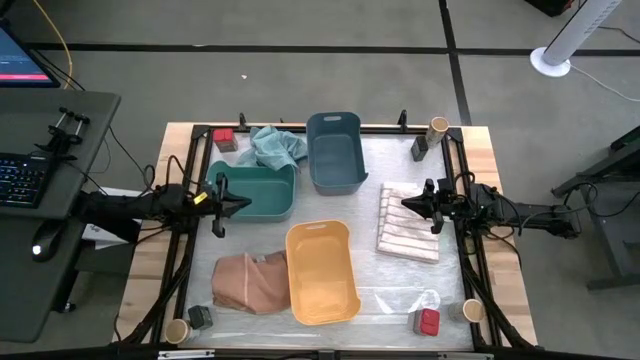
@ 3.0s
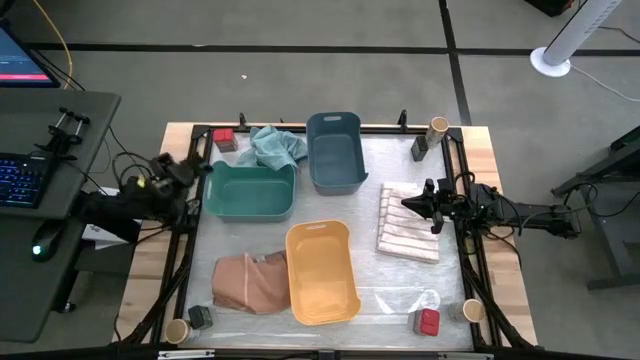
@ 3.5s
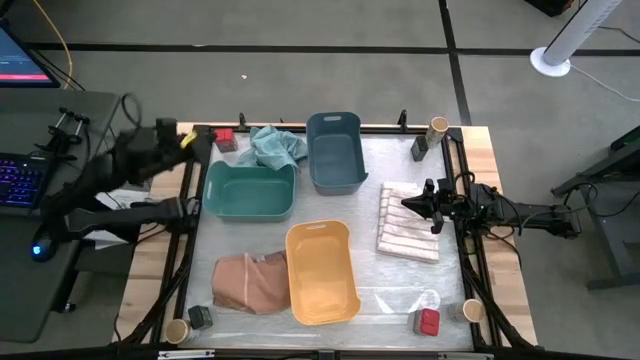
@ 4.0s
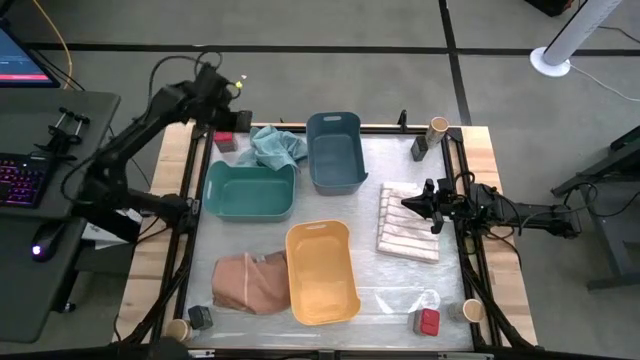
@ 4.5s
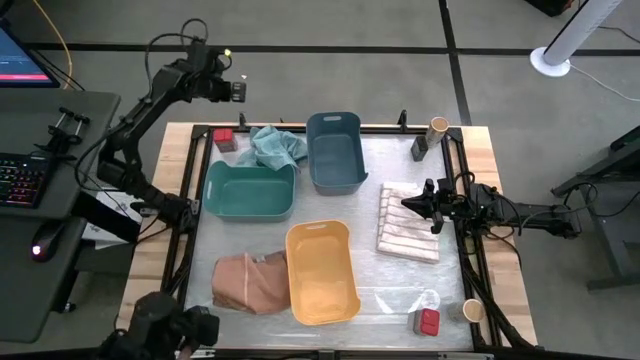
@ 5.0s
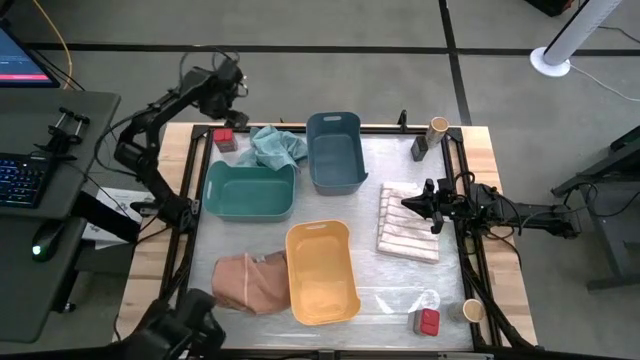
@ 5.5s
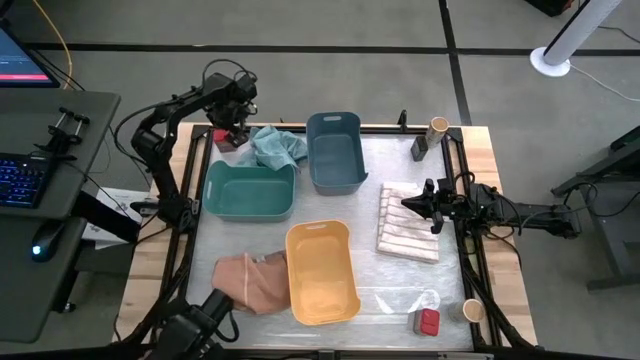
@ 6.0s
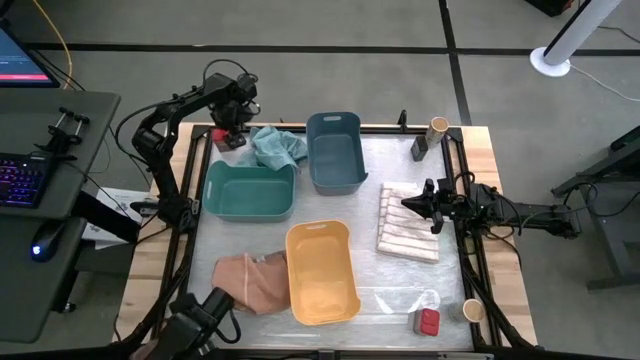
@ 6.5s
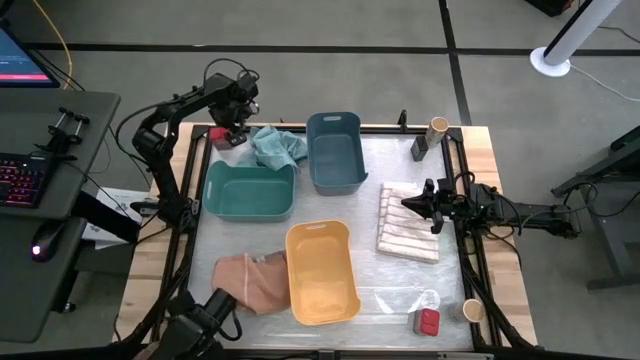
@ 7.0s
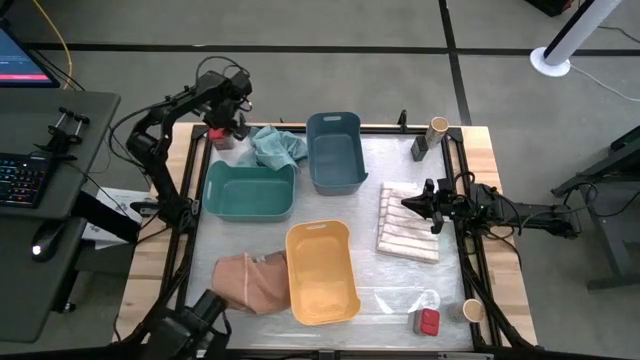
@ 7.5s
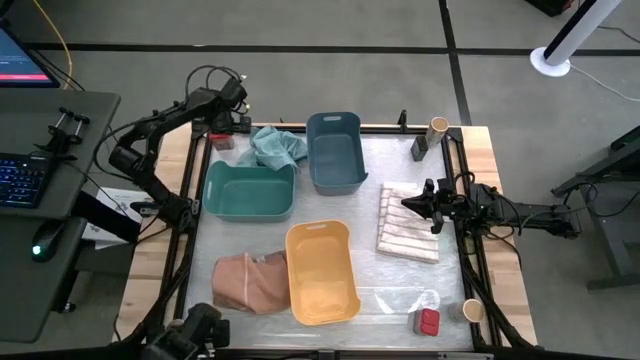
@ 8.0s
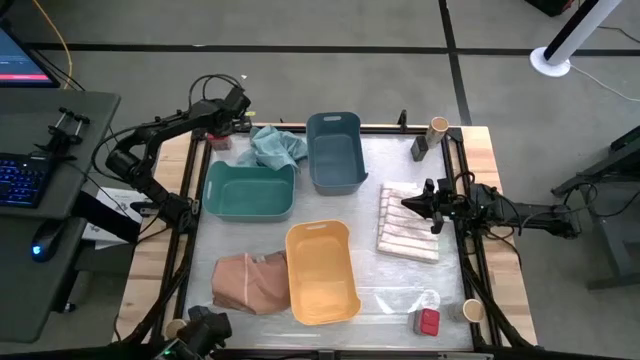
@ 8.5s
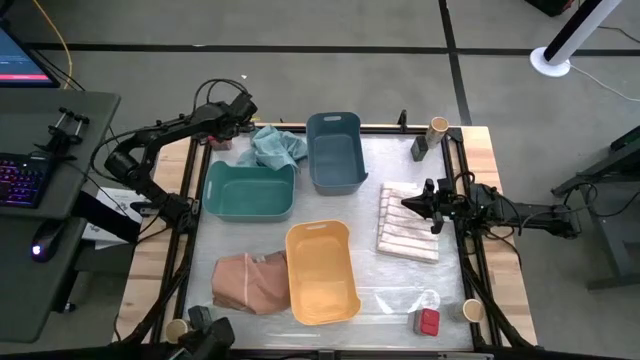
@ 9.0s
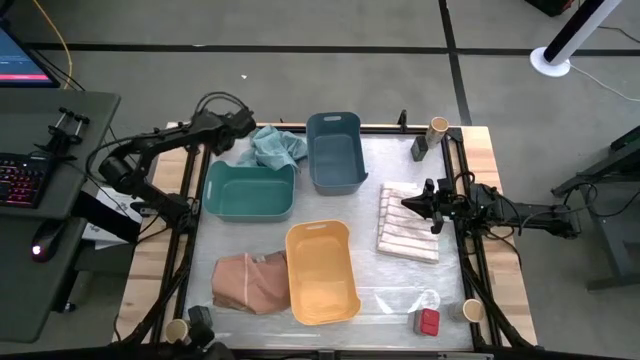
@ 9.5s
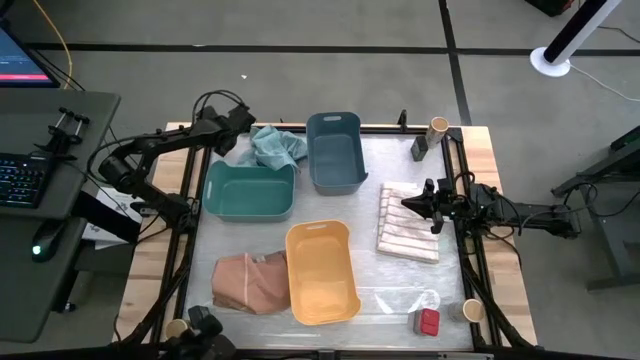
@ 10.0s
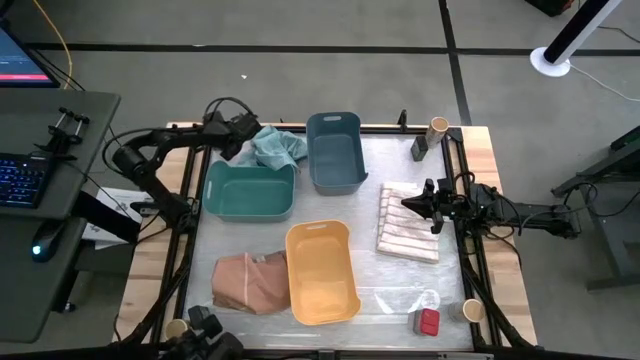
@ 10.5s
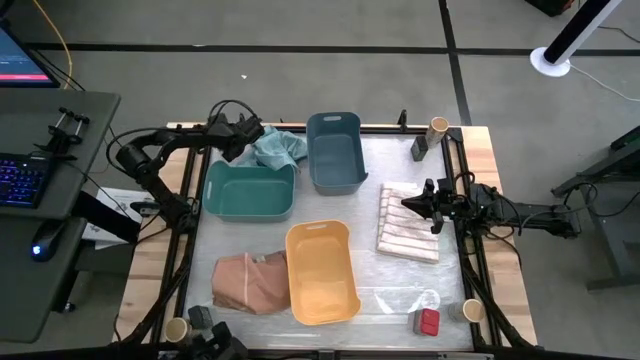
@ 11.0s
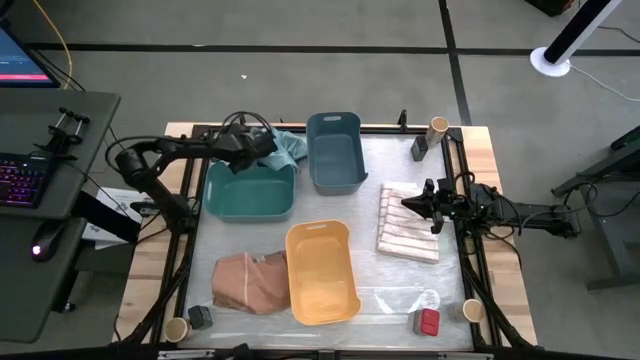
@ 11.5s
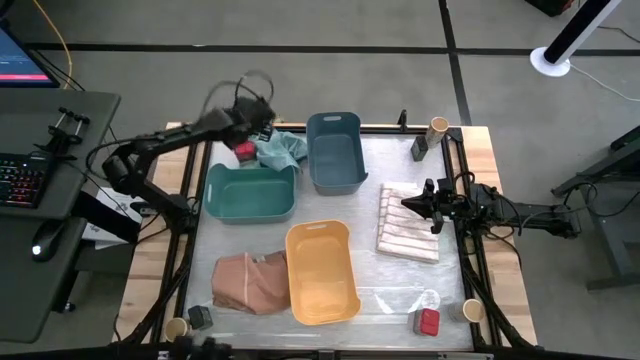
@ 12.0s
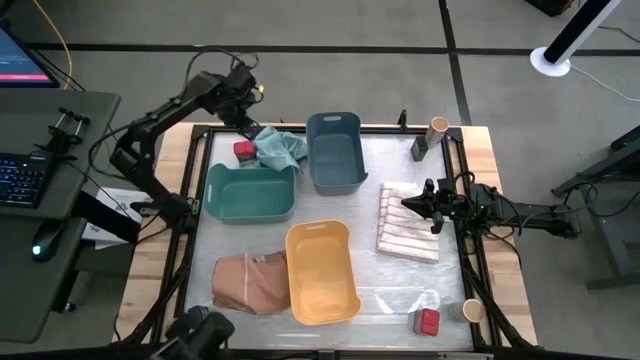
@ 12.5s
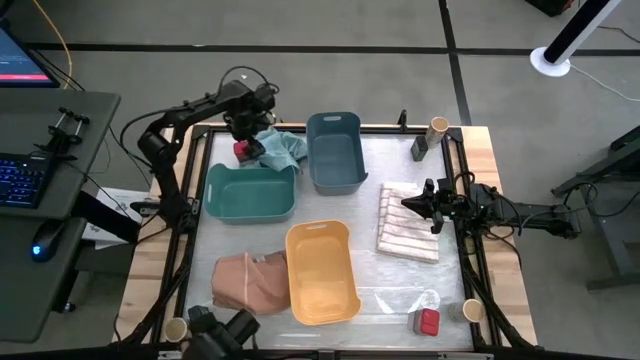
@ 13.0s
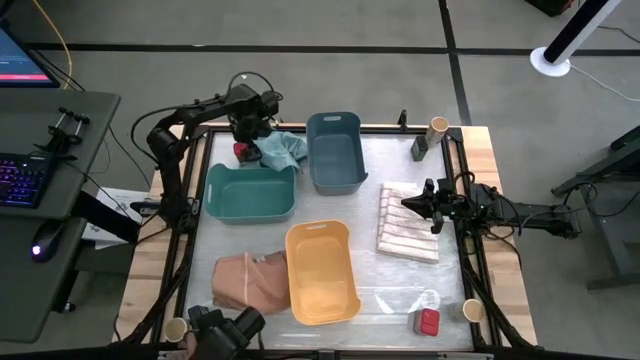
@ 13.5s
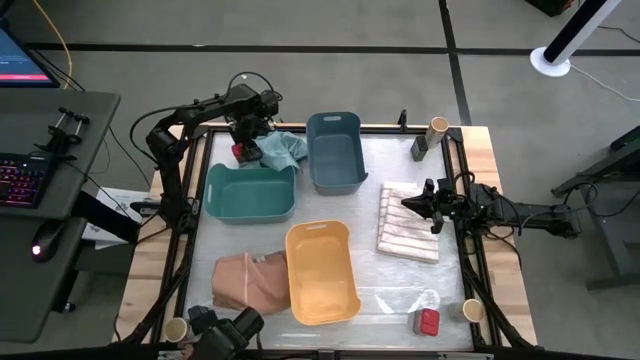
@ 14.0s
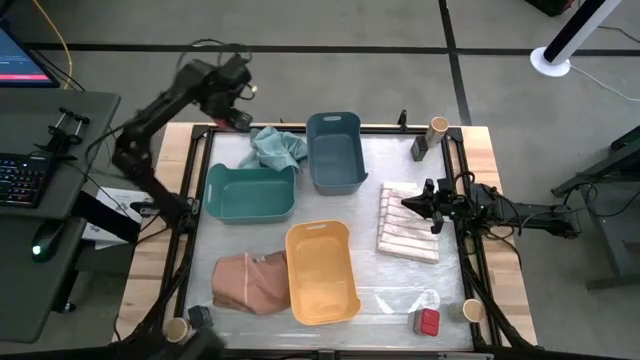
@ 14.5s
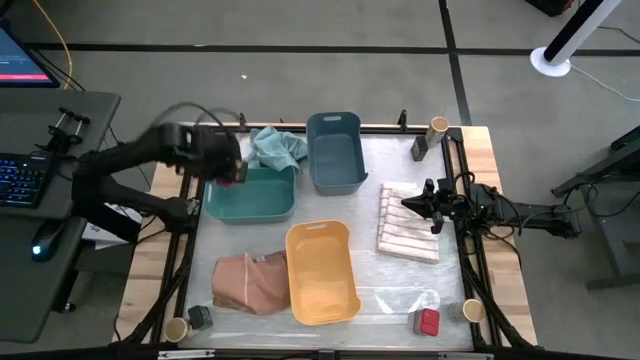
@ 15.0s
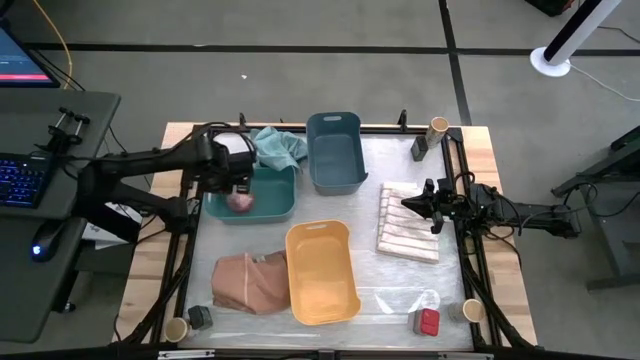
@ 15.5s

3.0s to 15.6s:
Task: Sort spices by type
Put the top red seasoning can into the green bin

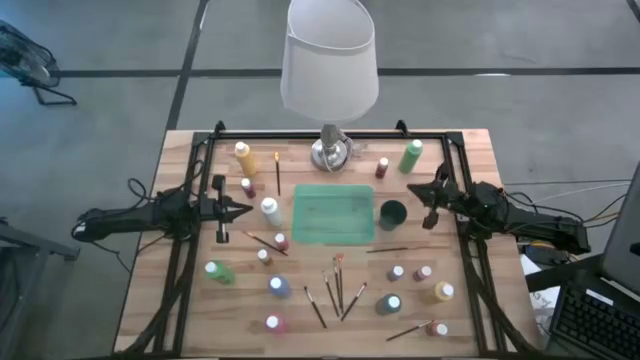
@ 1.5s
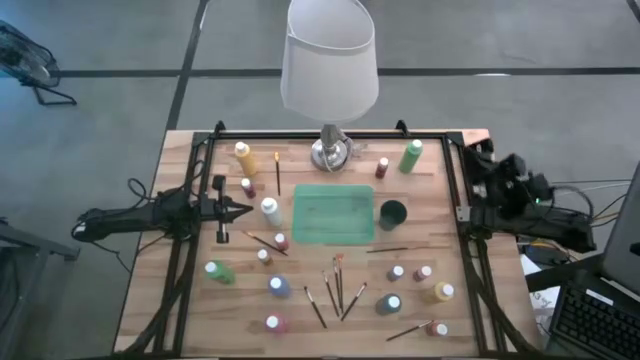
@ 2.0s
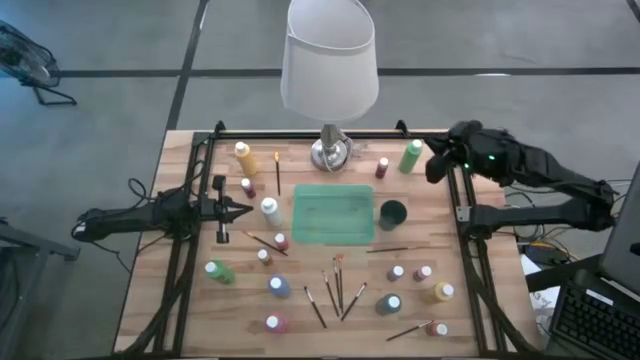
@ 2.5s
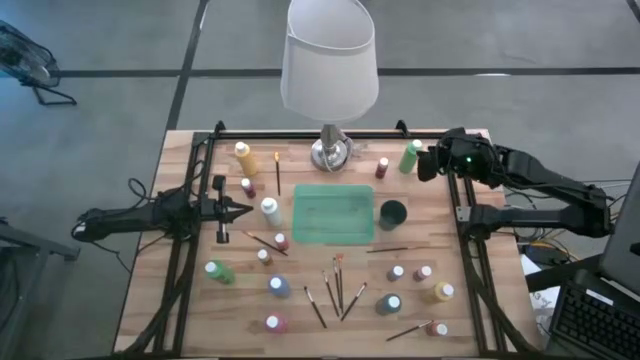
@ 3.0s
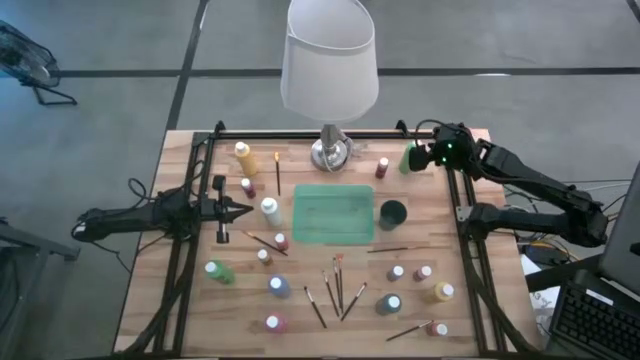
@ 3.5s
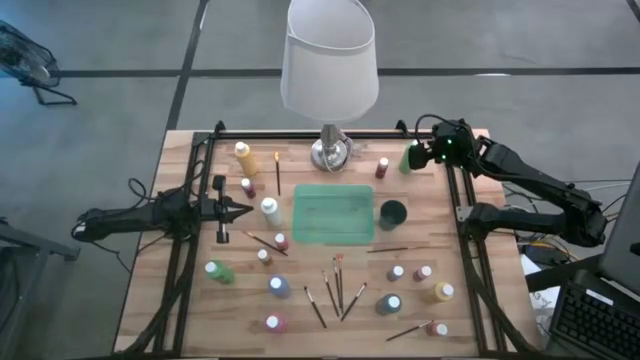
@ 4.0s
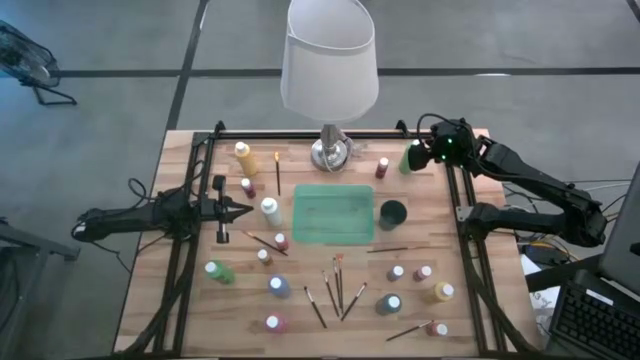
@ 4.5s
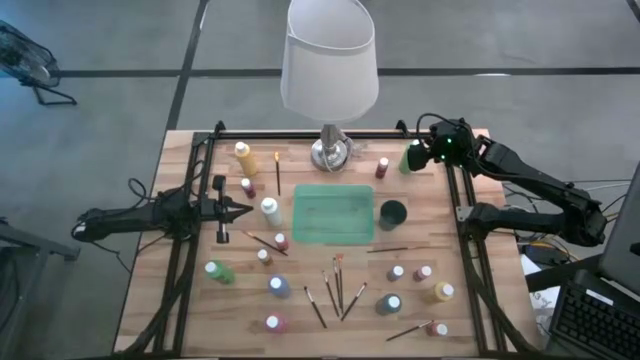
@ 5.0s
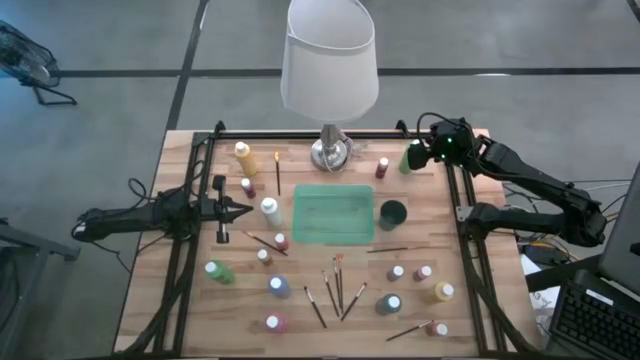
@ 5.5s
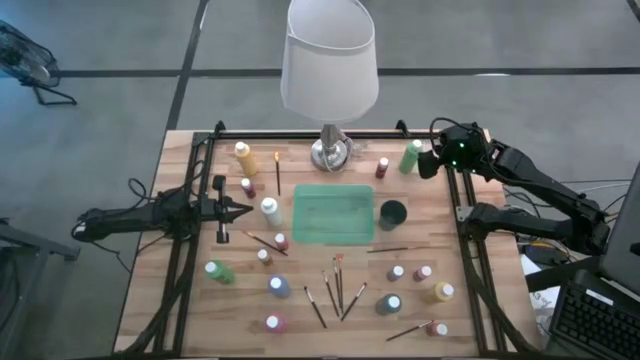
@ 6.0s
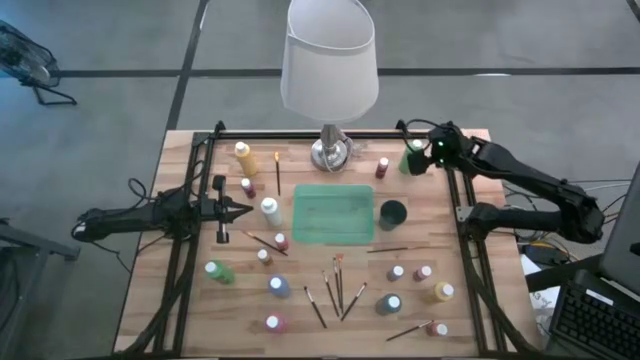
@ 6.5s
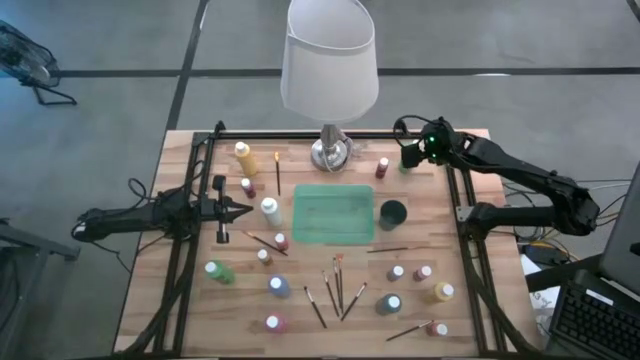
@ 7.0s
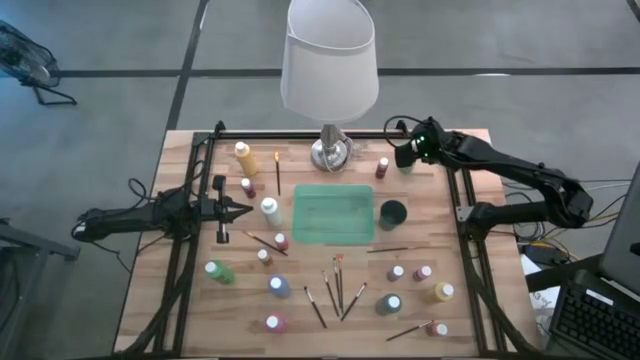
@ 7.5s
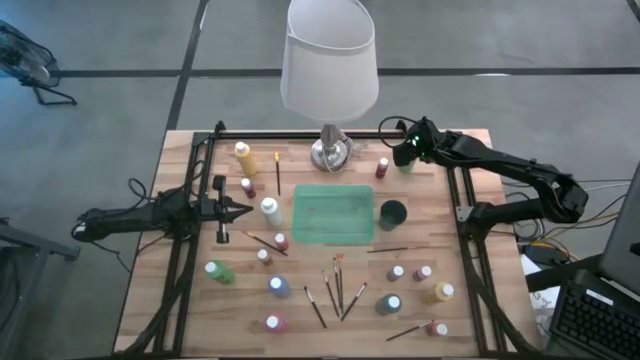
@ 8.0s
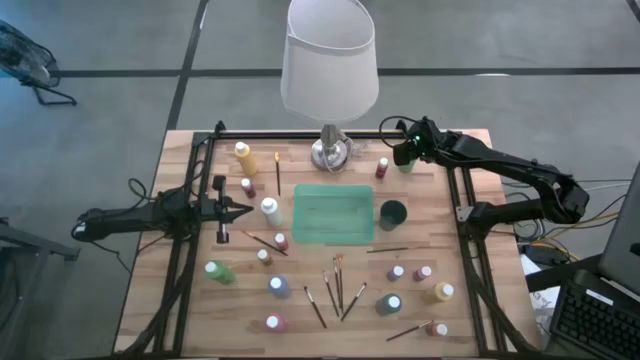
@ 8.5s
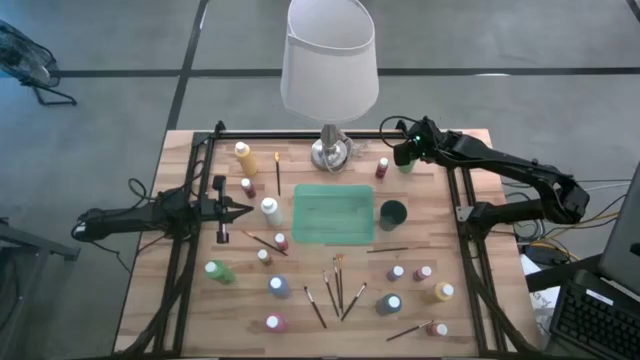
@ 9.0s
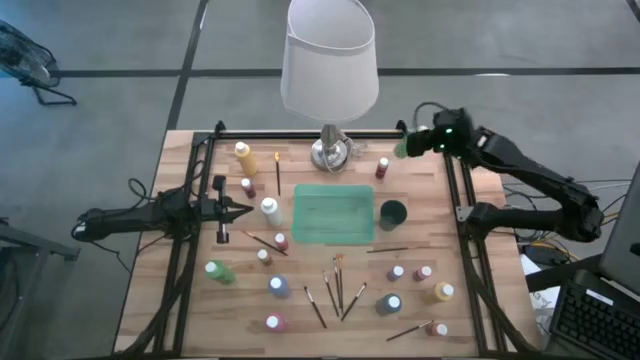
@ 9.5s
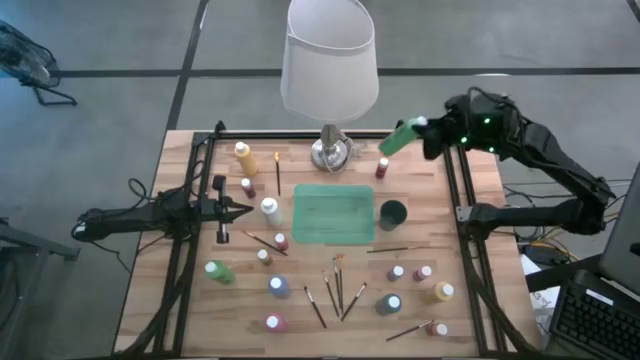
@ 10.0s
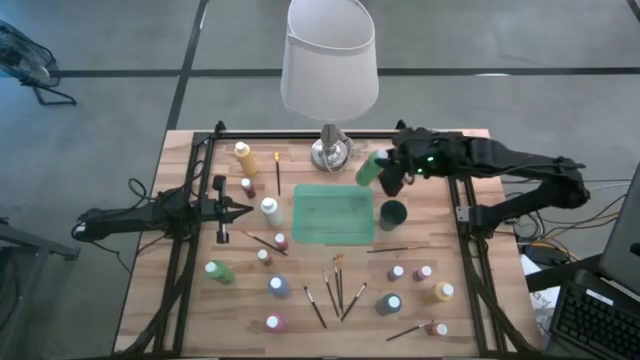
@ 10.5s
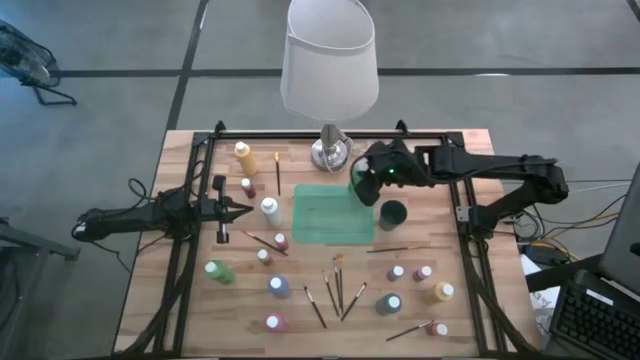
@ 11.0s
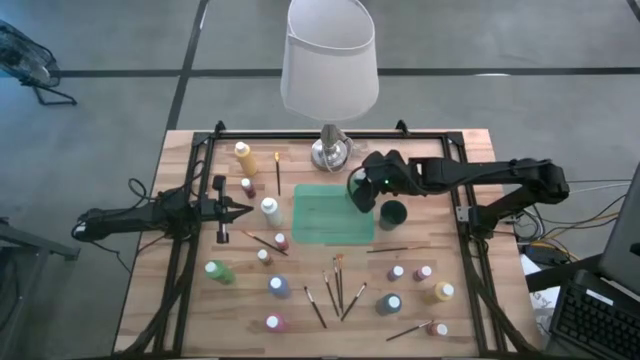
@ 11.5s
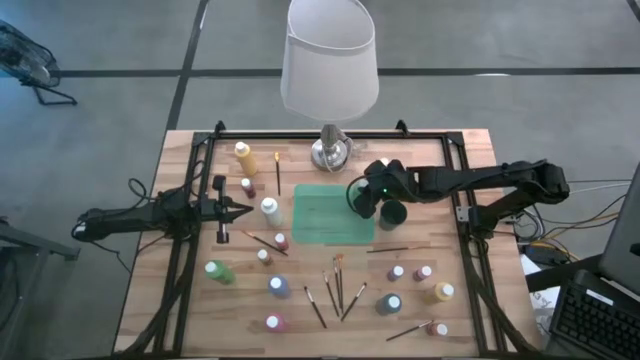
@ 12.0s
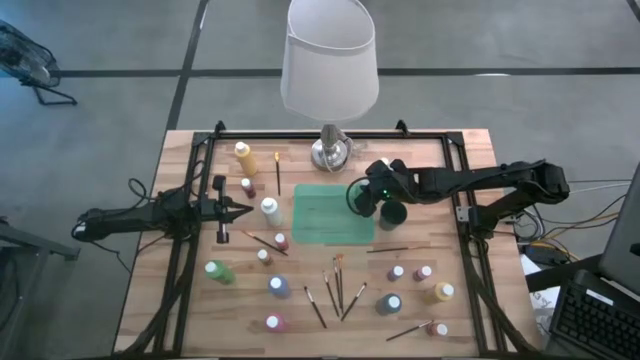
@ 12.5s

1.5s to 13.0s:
Task: Pick & Place Paint Supplies
Put the green paint bottle into the green bin
